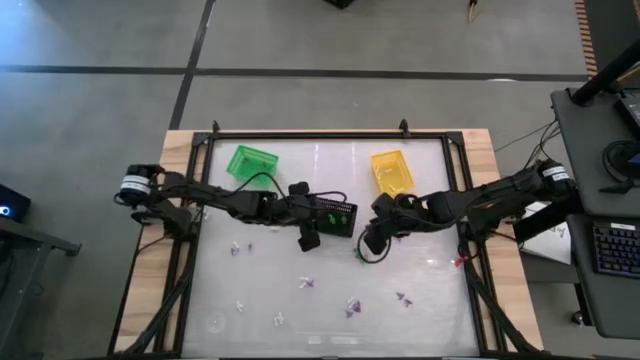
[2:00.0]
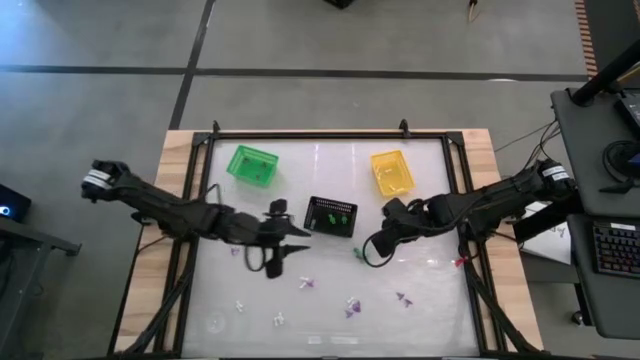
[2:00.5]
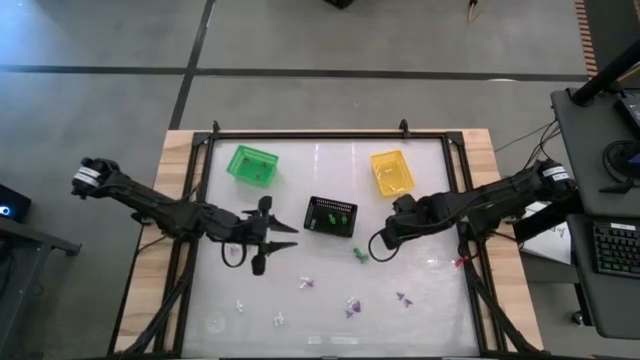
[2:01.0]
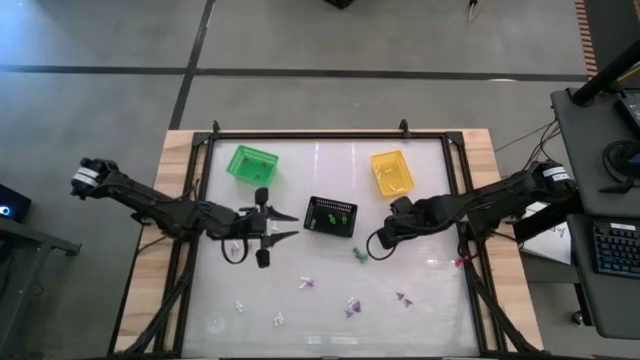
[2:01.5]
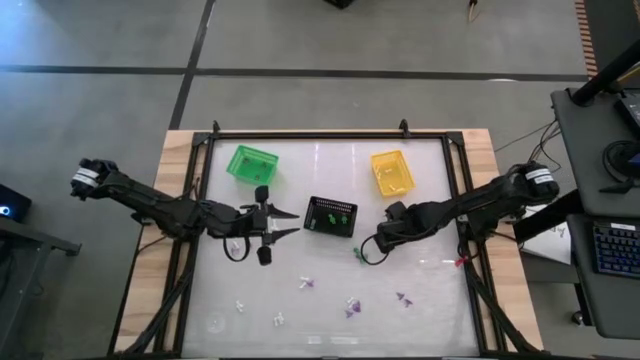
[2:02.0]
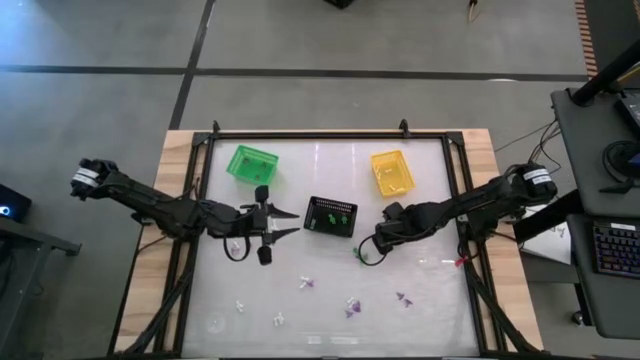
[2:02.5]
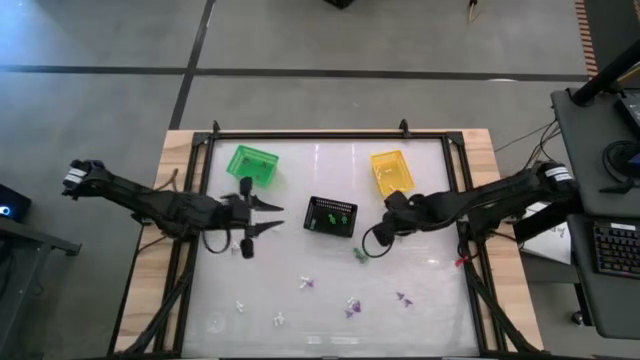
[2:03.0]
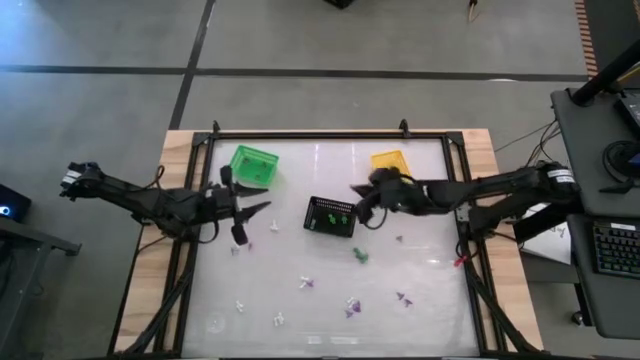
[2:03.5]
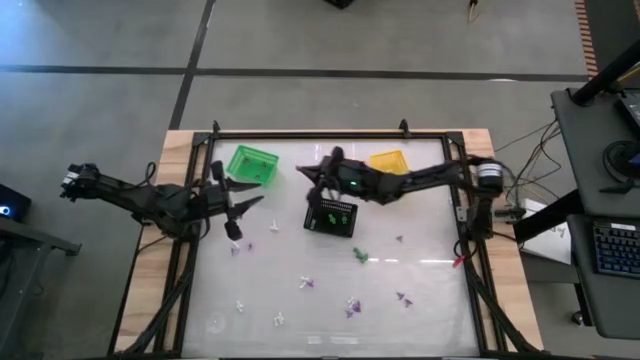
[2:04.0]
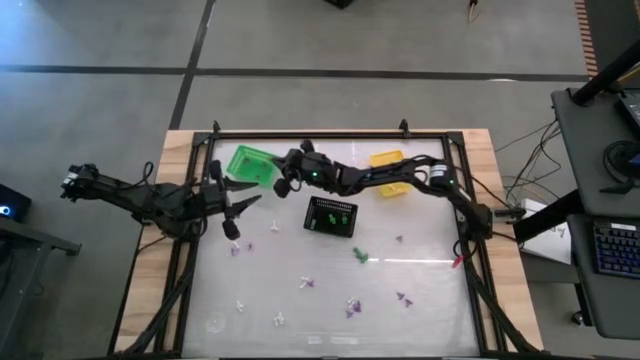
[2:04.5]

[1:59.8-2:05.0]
Task: Sort Halloween decoration
Put the purple hat into the green bin

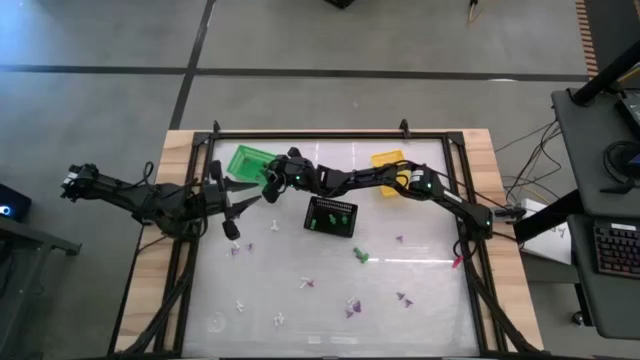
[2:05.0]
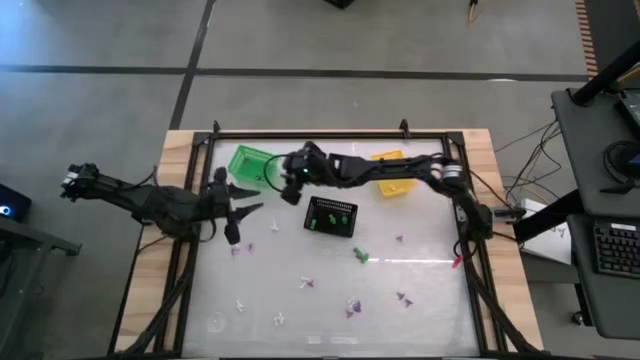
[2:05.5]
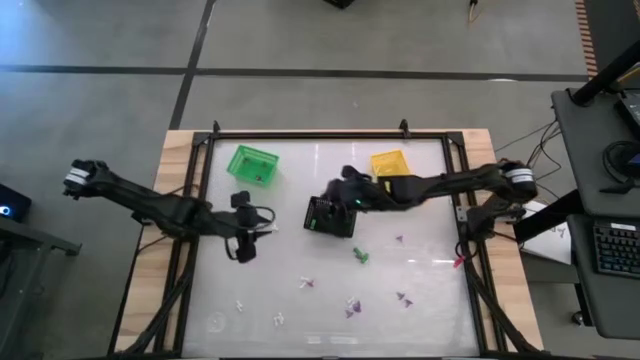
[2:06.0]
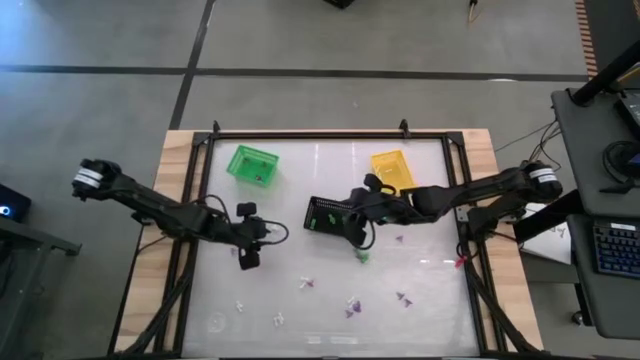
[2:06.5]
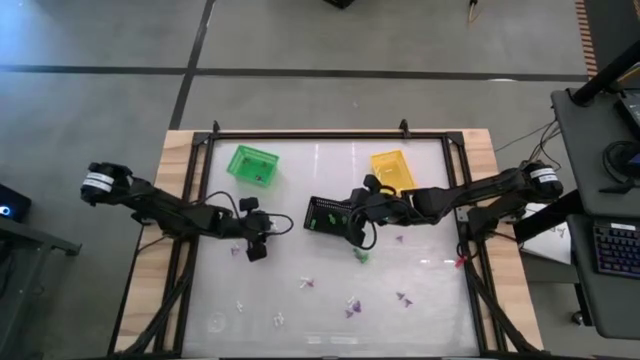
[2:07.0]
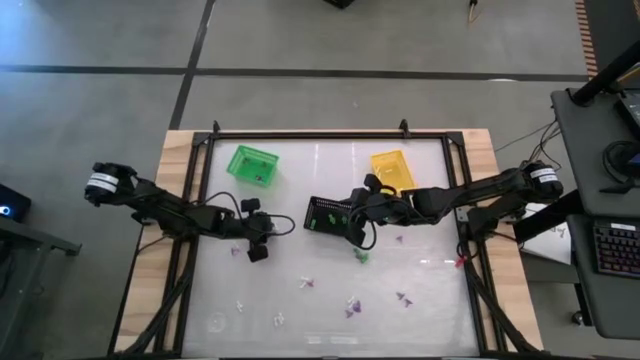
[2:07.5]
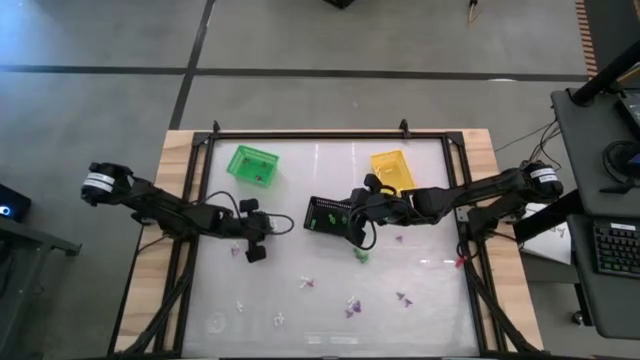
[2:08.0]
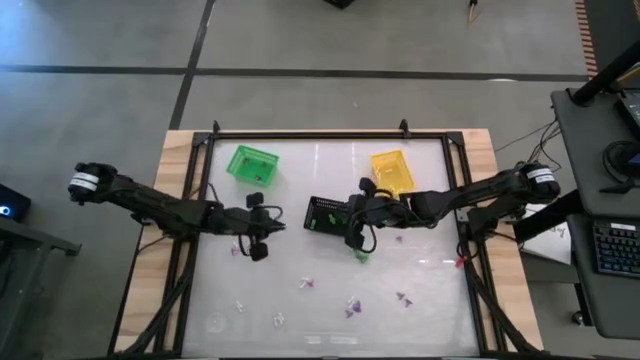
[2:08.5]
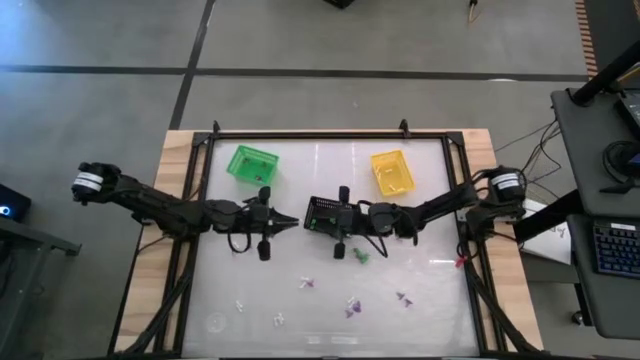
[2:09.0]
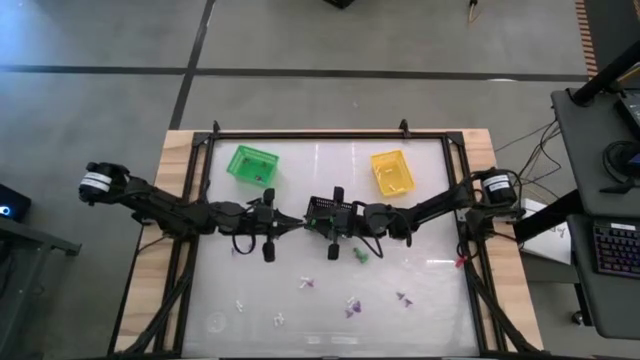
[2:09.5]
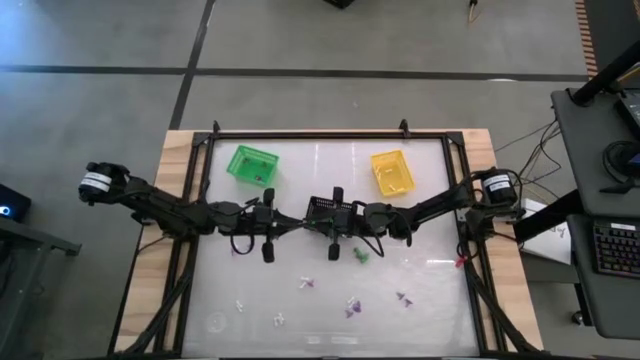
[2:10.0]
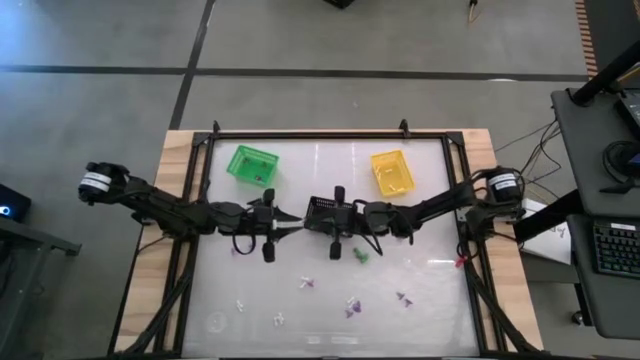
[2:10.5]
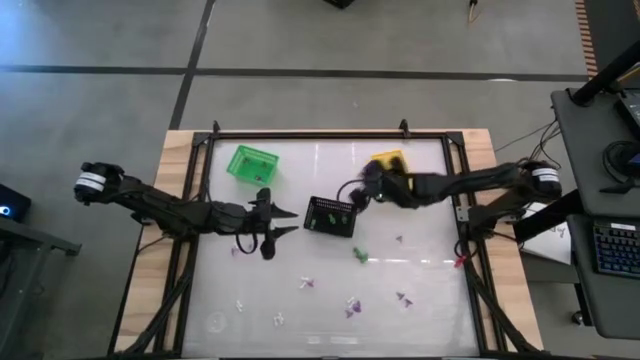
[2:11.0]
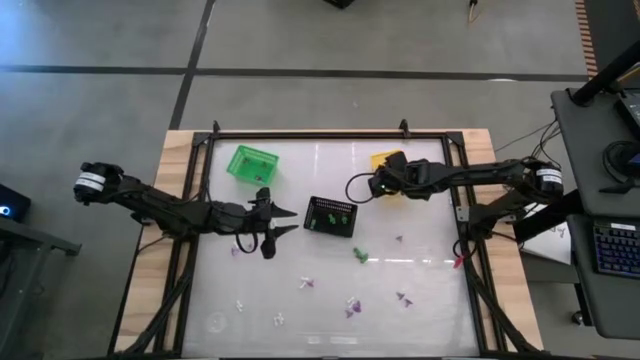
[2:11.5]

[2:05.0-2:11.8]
Put the white bone toy into the yellow bin

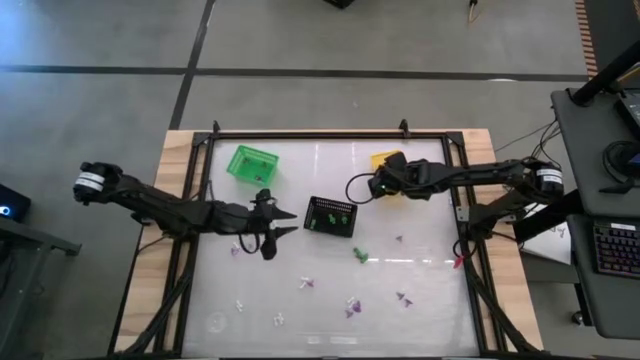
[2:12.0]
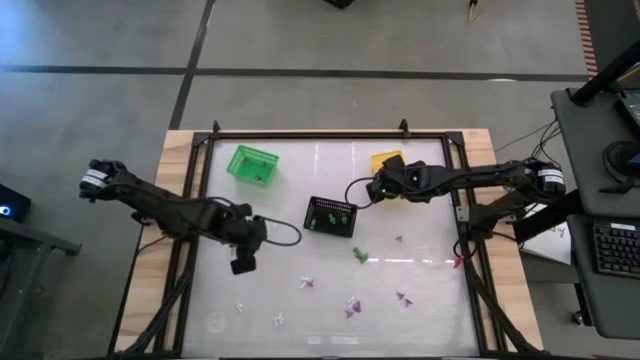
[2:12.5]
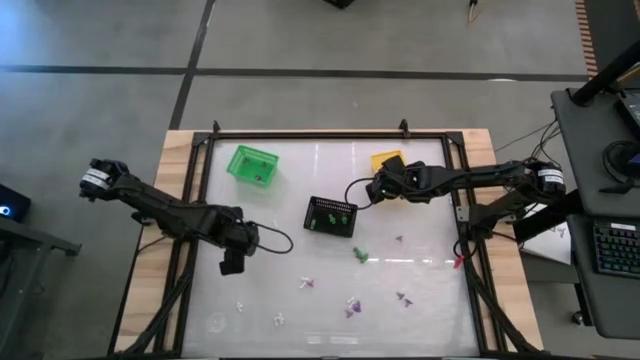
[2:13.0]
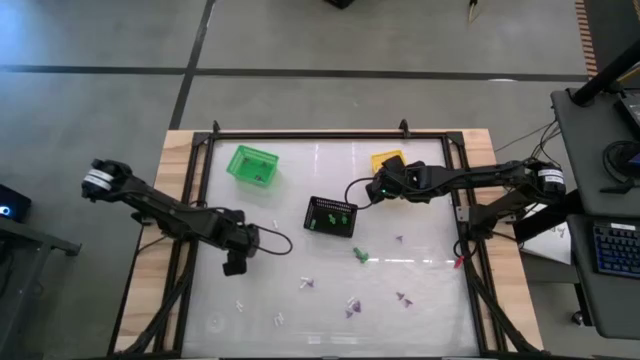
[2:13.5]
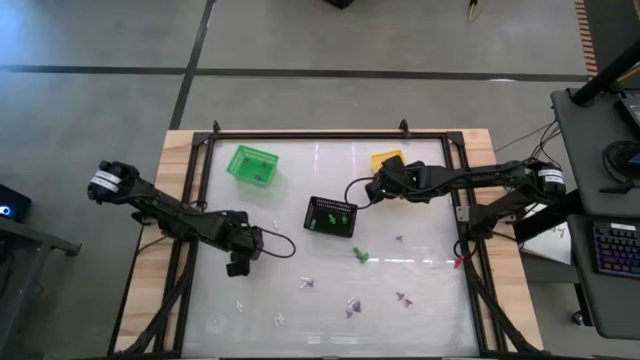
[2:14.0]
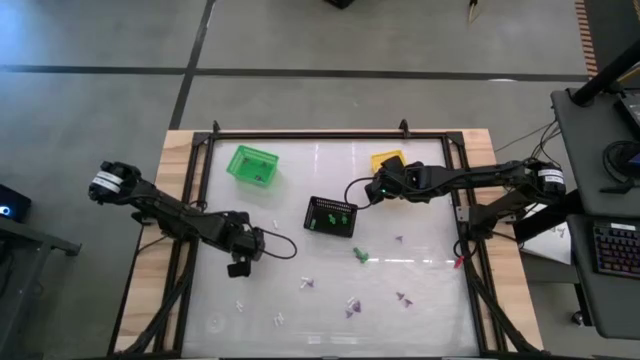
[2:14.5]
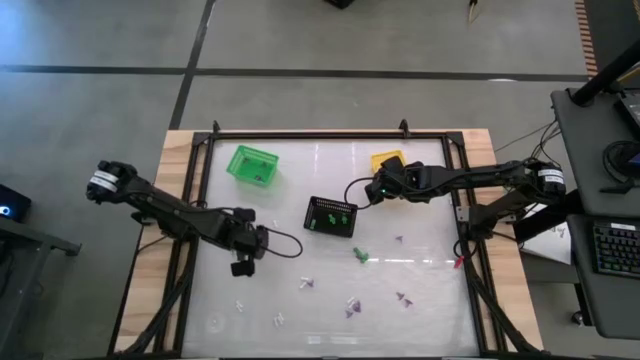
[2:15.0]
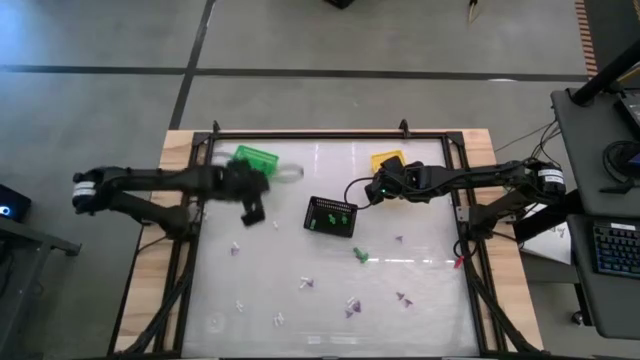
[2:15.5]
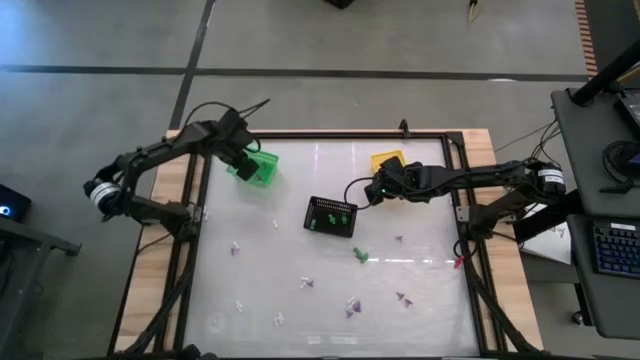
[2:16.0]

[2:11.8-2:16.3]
Put the purple witch hat toy into the green bin

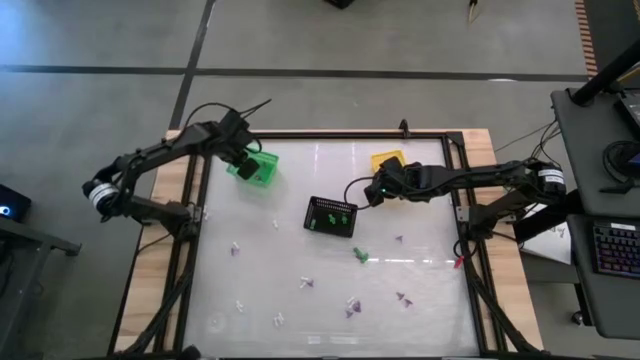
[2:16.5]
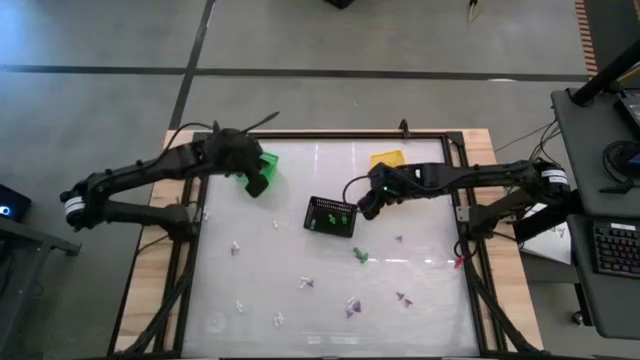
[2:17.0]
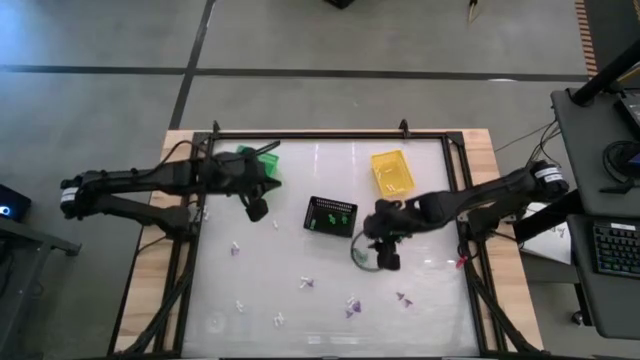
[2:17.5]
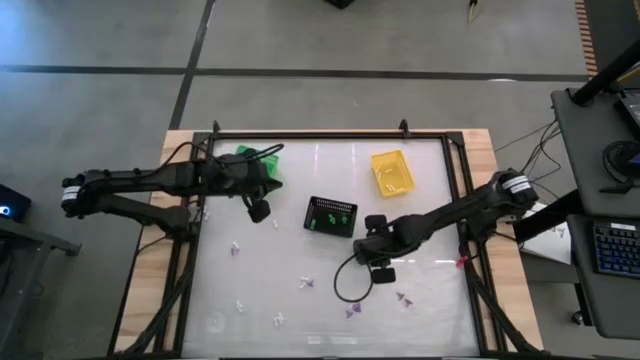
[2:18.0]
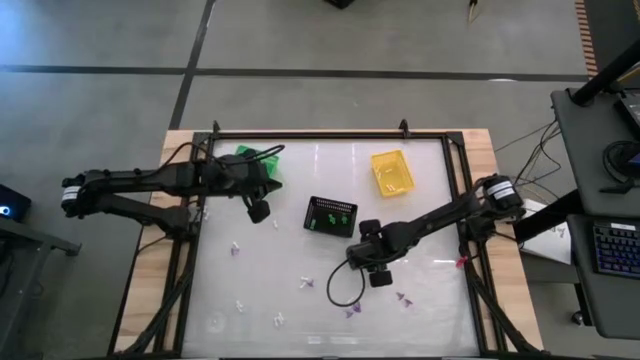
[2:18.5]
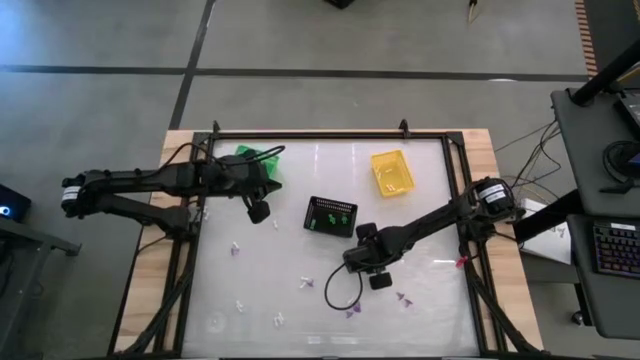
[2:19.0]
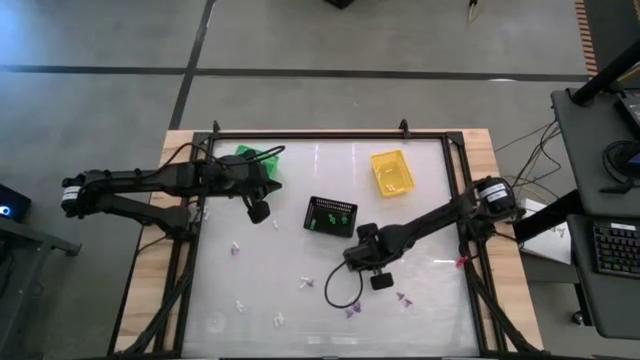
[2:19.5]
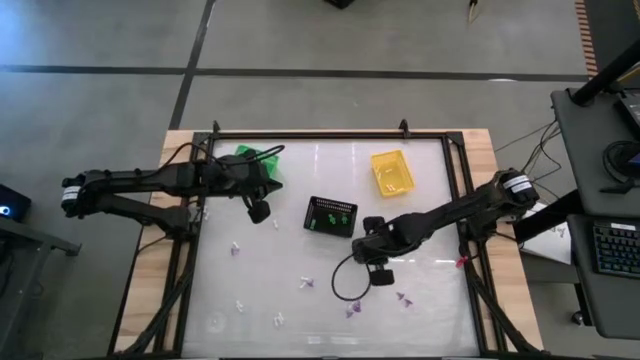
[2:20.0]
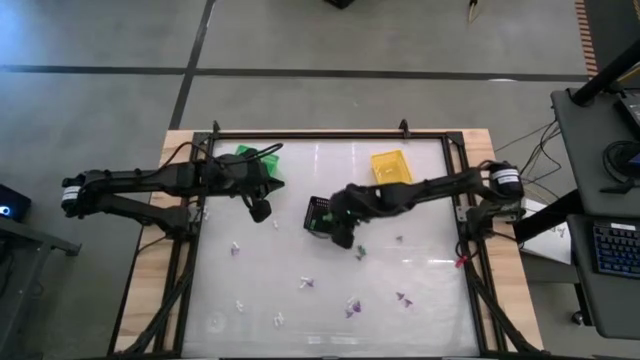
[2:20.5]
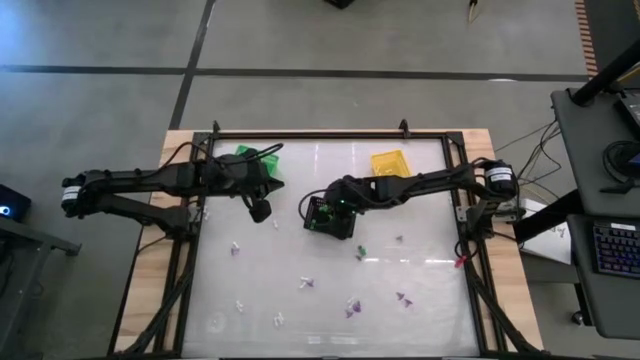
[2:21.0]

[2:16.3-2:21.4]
Put the green skeleton toy into the black bin
